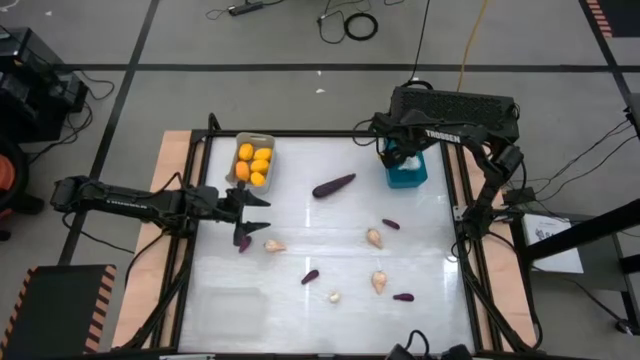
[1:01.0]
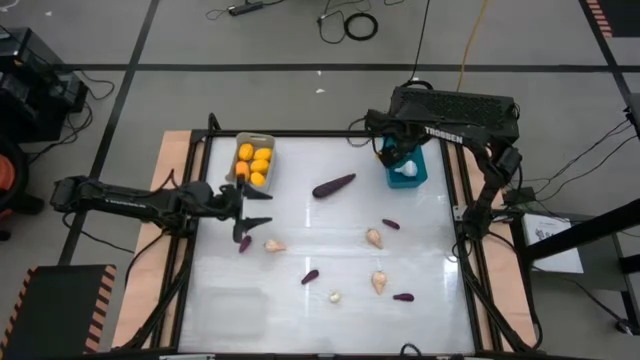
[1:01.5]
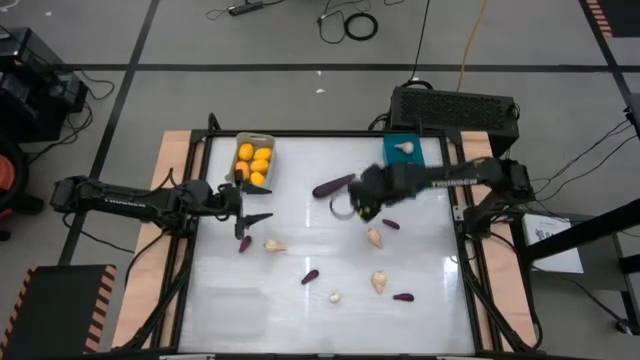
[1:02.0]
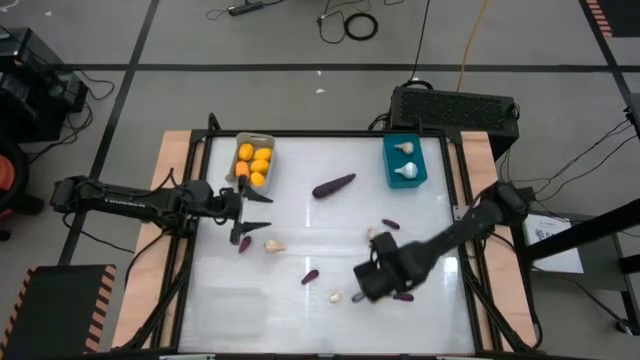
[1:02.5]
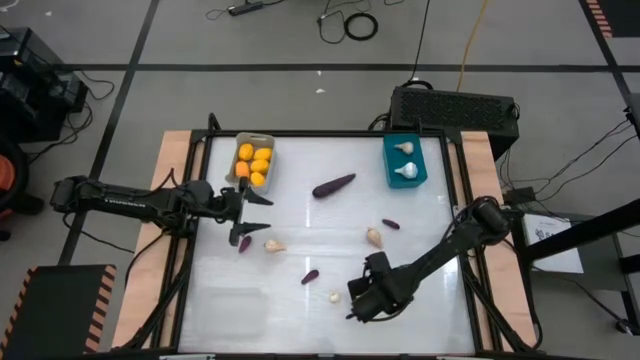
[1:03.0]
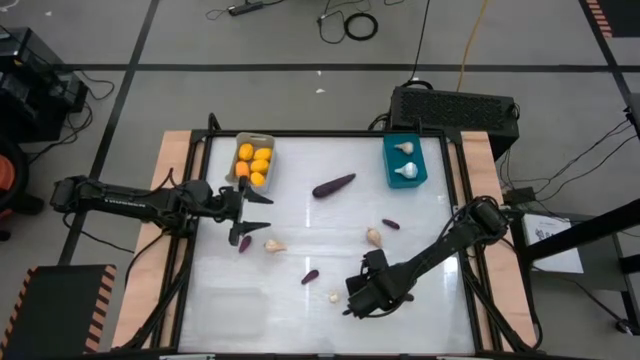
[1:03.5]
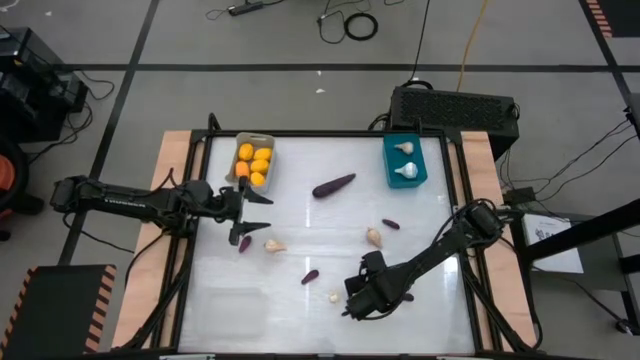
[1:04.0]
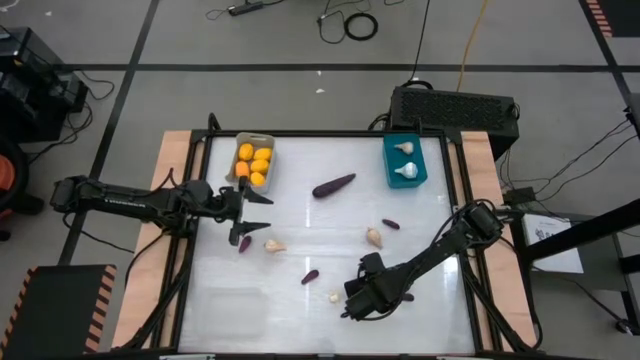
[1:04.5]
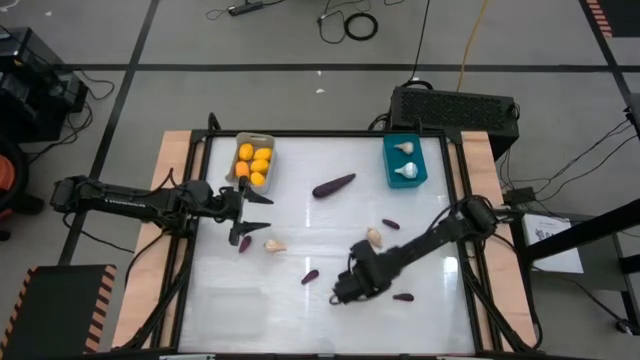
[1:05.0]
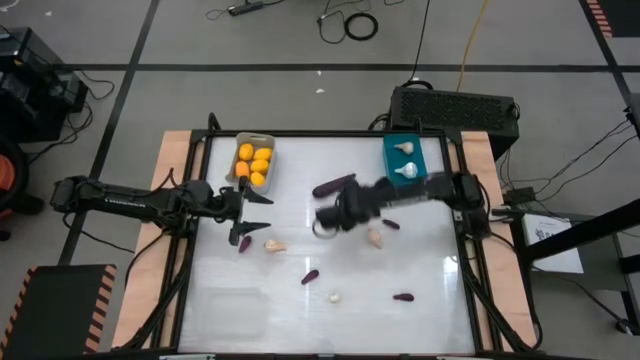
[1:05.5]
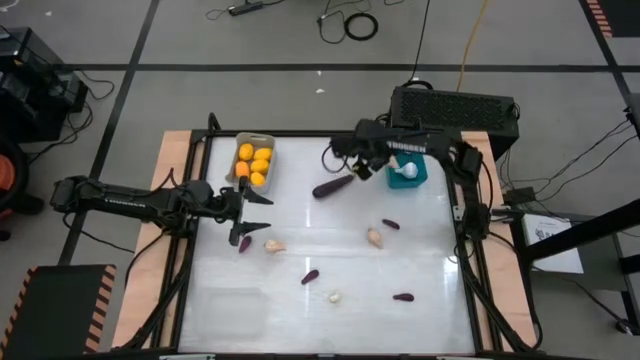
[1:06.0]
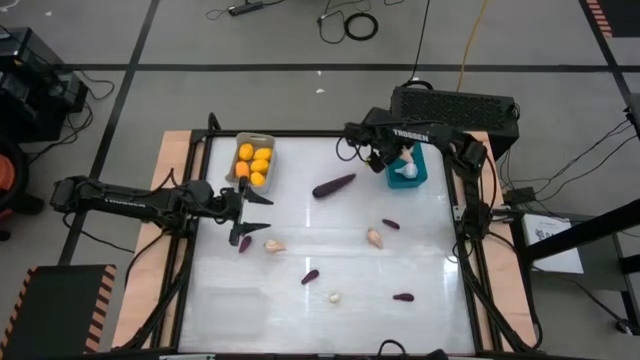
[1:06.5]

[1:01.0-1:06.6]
Task: Sort produce into baskets
Put the garlic into the blue bin

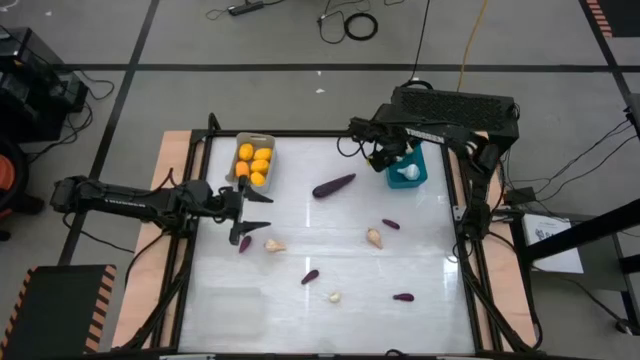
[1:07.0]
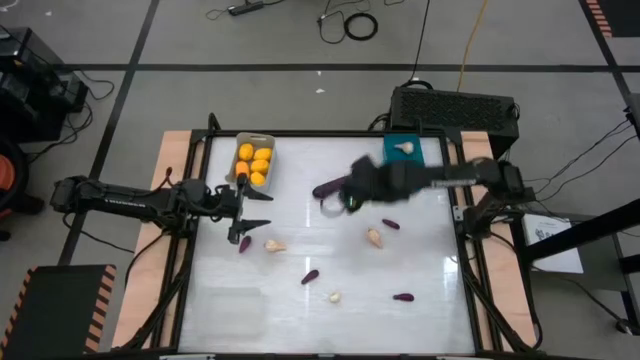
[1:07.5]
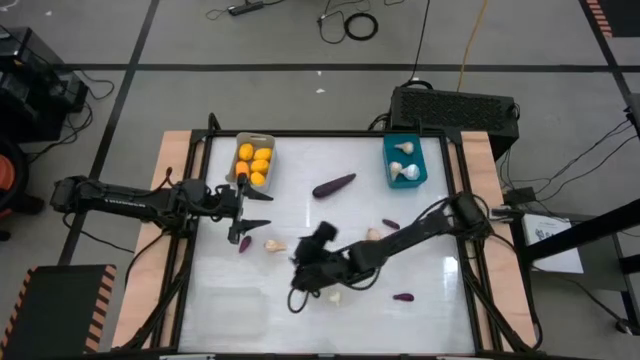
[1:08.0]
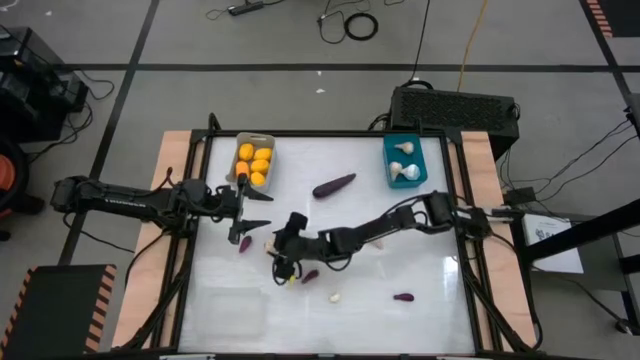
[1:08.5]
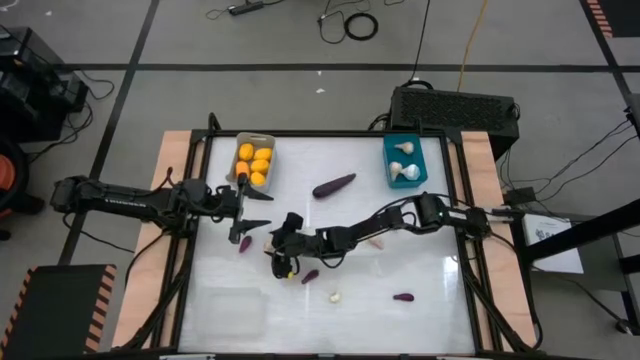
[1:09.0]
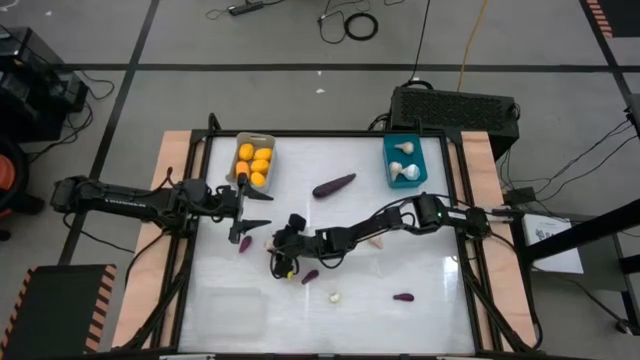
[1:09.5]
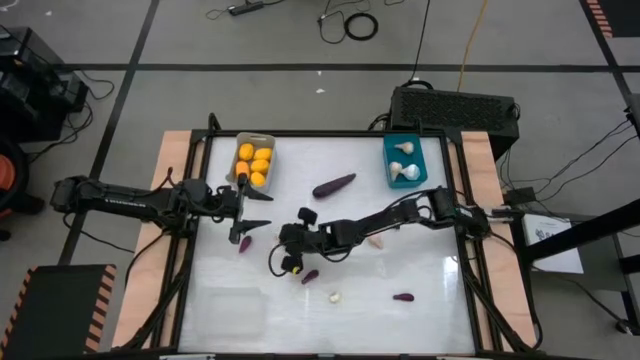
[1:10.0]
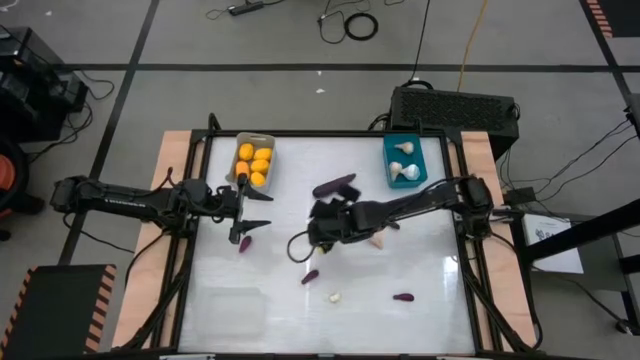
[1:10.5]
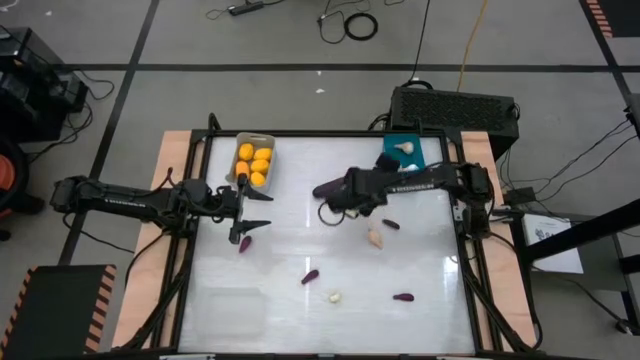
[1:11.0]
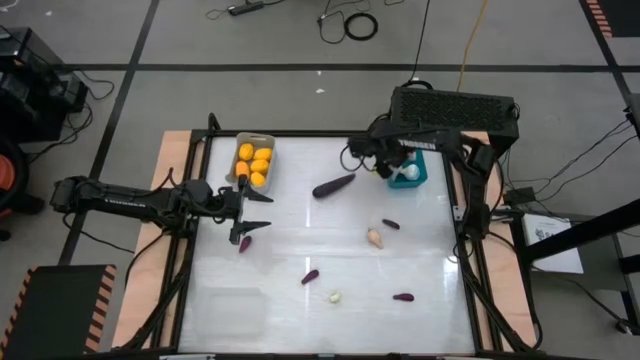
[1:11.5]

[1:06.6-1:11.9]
Put the garlic into the blue bin

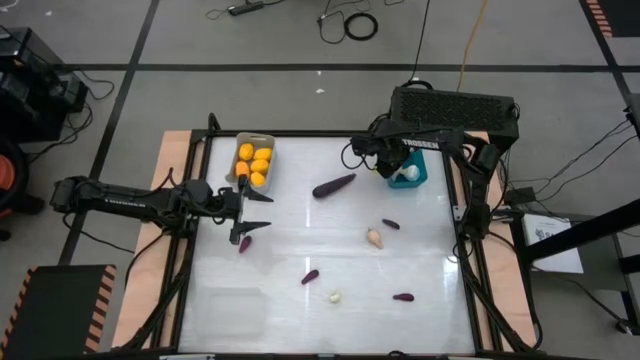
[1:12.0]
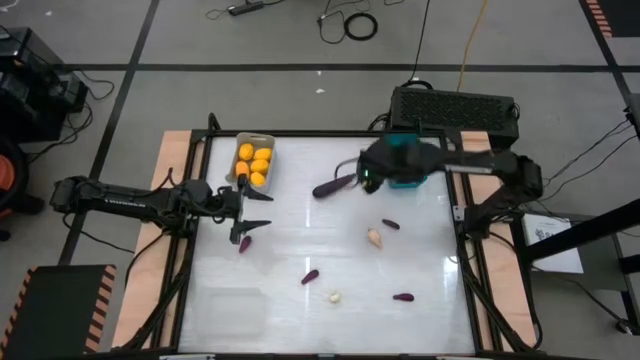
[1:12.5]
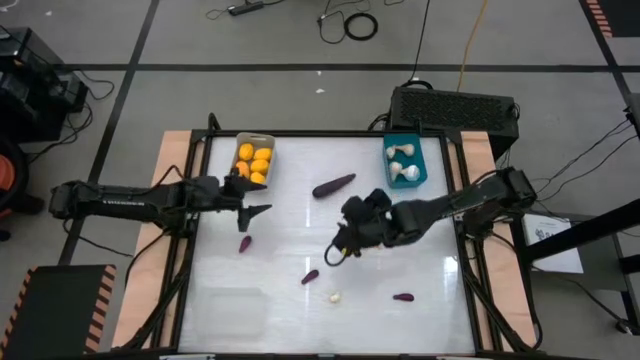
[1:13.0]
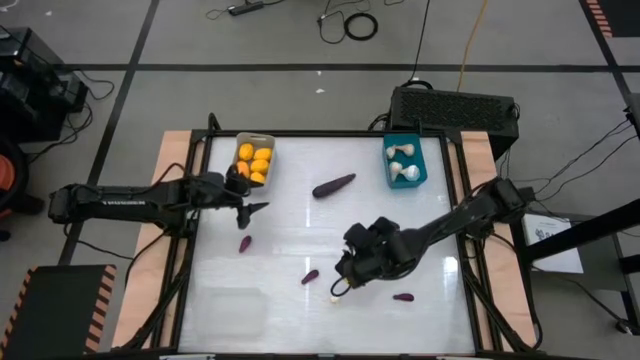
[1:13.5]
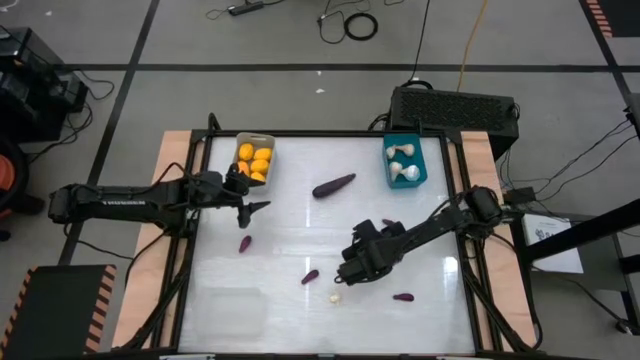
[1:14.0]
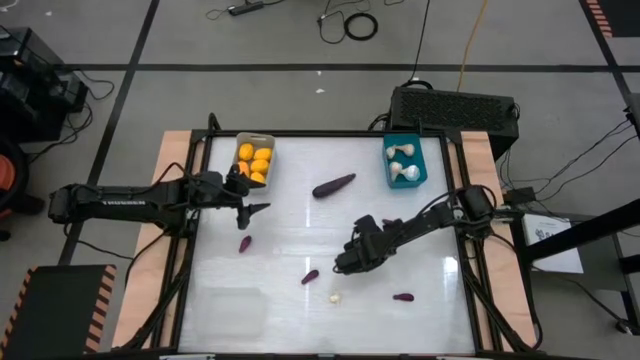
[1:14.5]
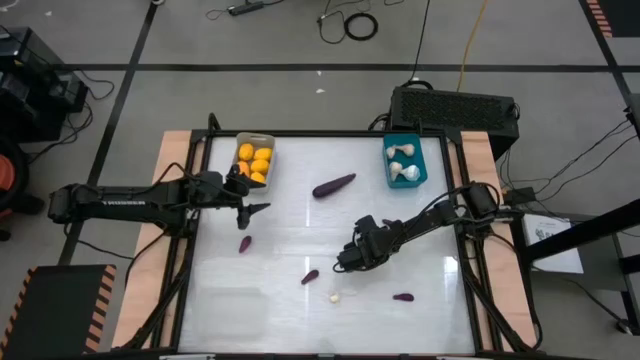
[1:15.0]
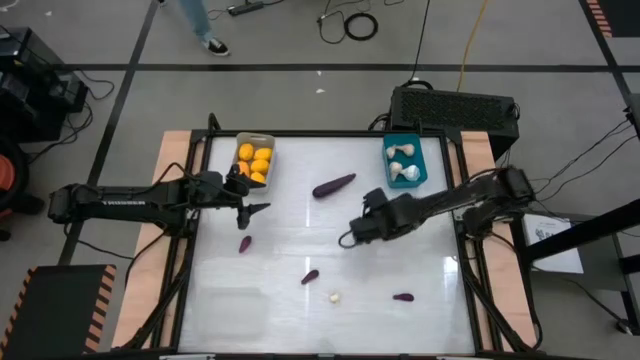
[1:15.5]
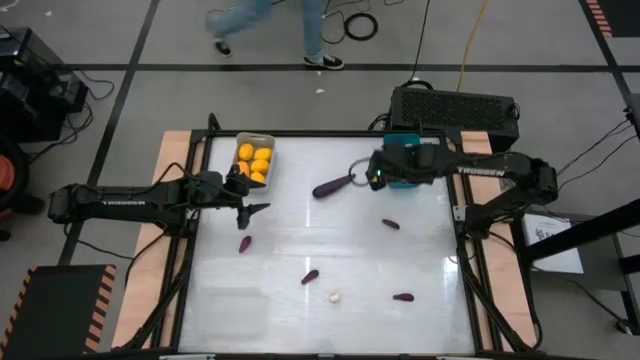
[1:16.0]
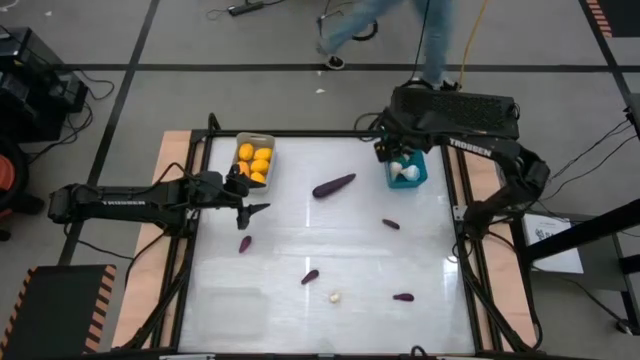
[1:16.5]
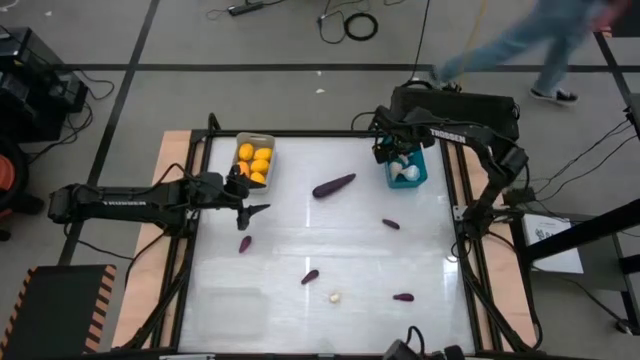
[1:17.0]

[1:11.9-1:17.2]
Put the garlic into the blue bin

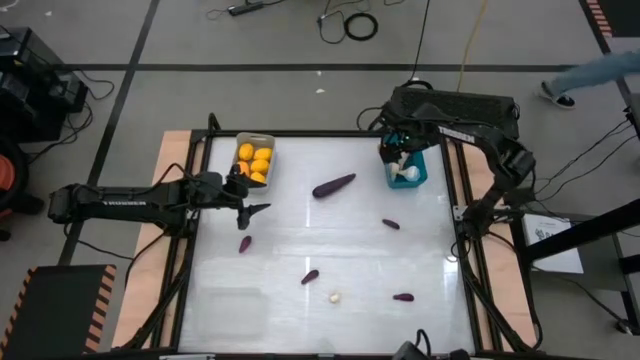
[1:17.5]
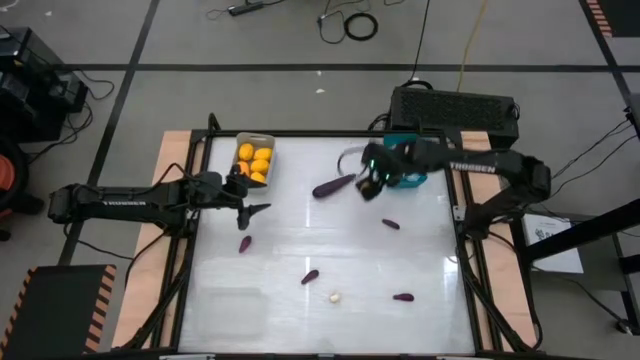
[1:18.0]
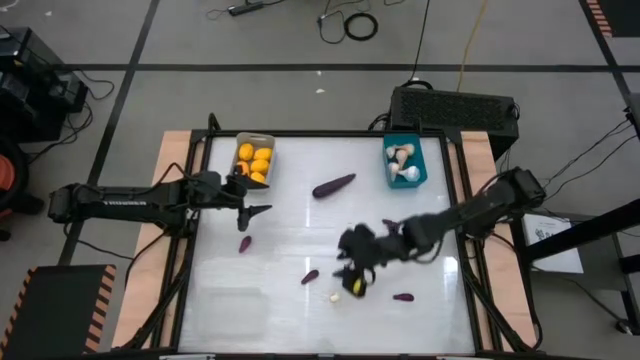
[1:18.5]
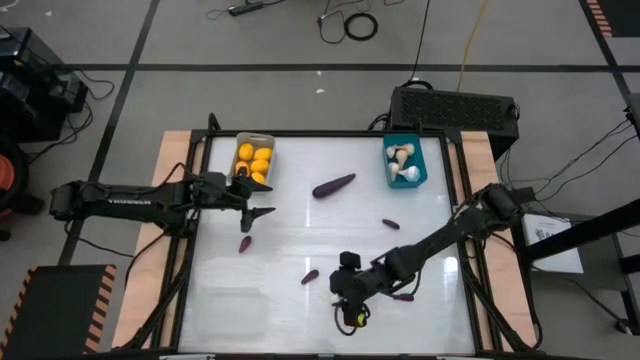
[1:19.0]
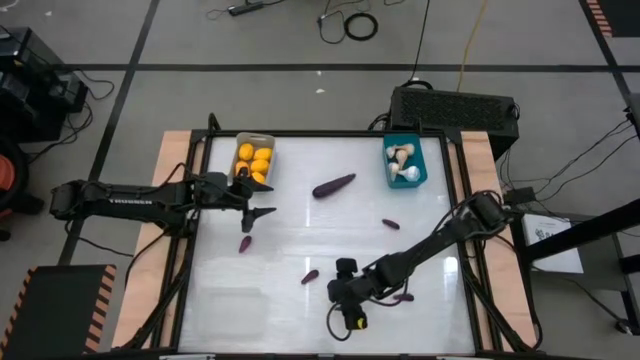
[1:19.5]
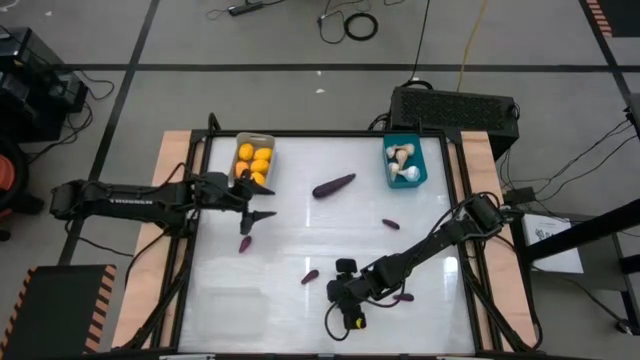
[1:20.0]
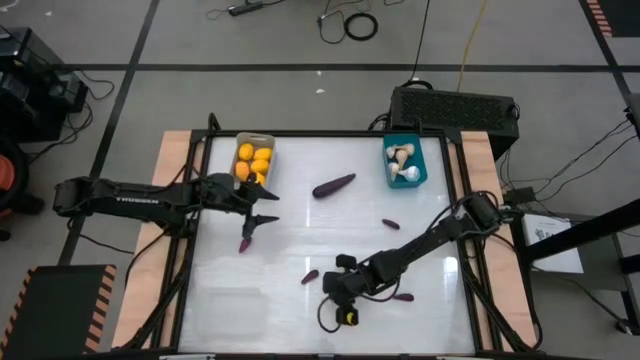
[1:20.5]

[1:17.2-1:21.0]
Put the garlic into the blue bin

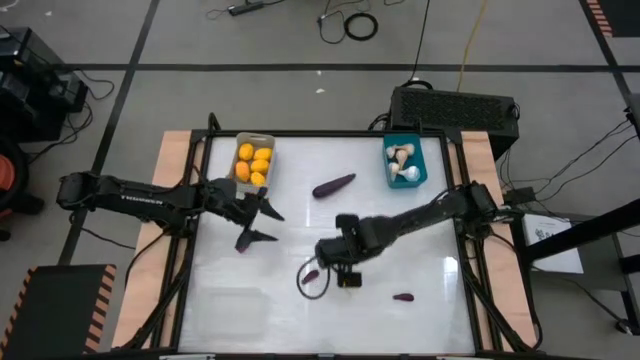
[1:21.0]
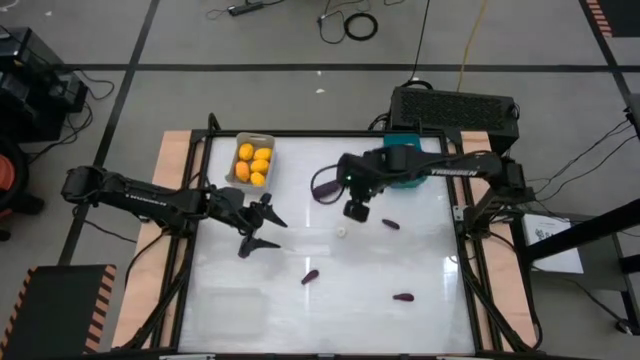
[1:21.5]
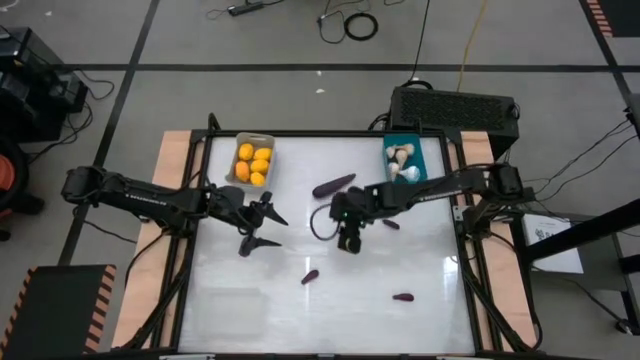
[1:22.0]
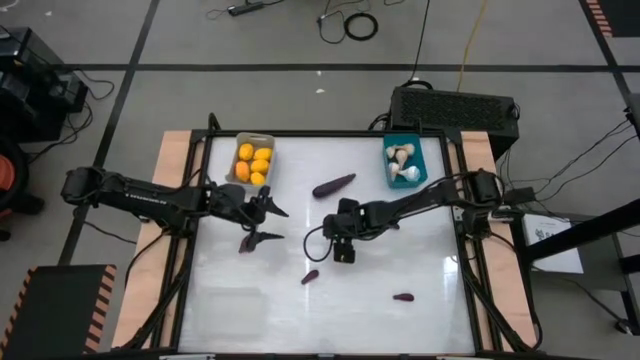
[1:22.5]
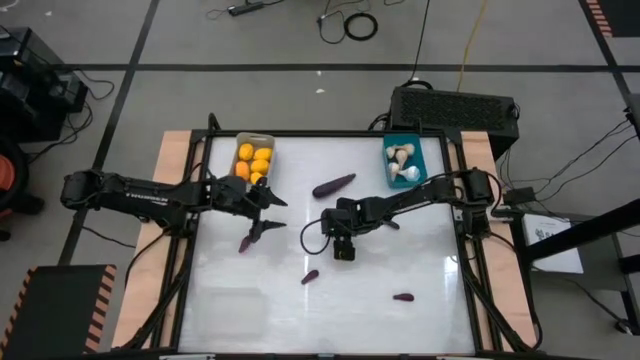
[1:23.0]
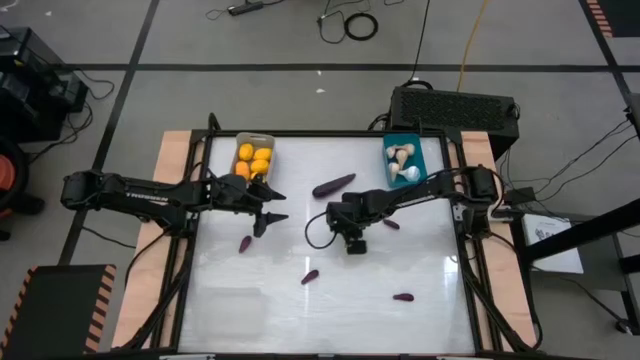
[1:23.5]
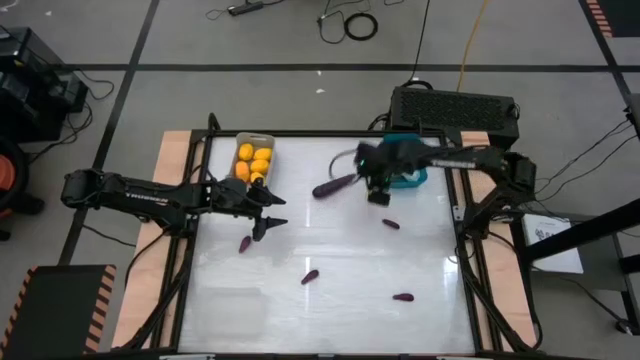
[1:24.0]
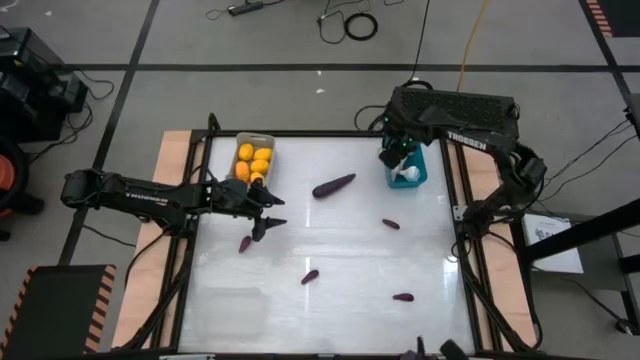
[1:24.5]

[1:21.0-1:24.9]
Put the garlic into the blue bin
